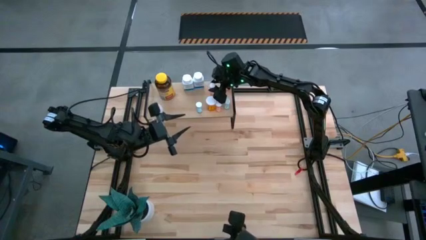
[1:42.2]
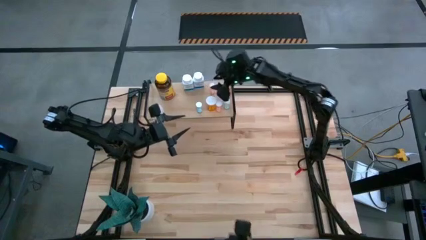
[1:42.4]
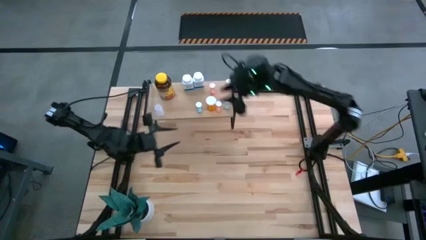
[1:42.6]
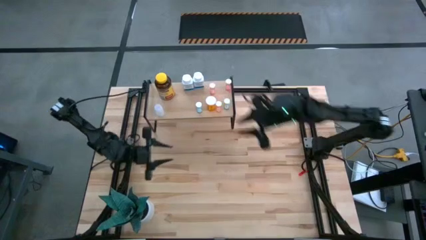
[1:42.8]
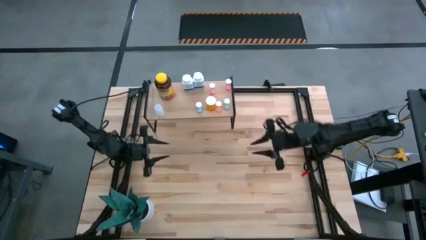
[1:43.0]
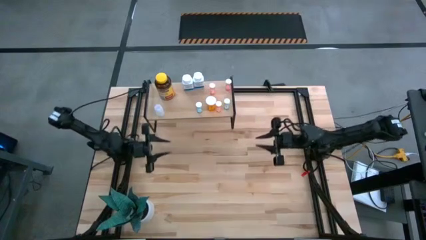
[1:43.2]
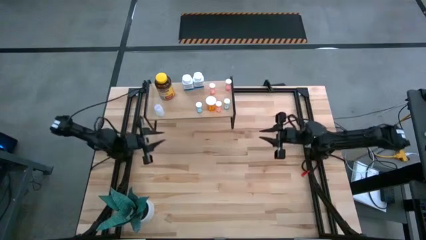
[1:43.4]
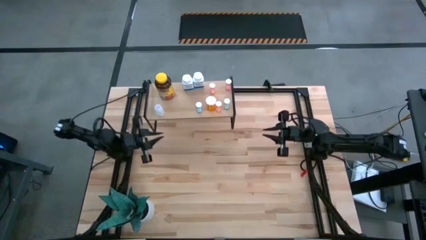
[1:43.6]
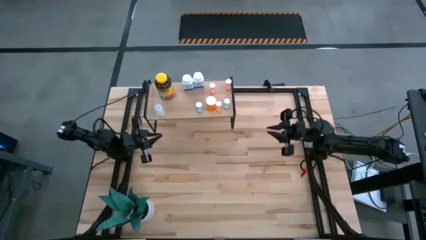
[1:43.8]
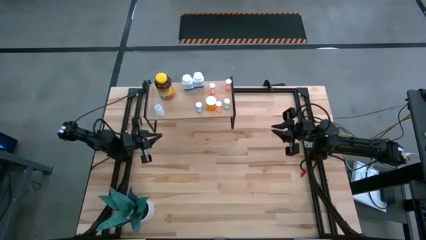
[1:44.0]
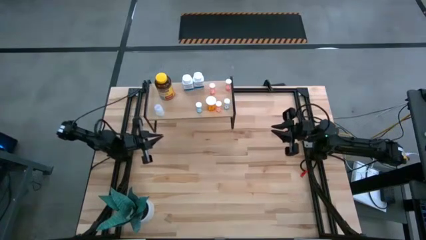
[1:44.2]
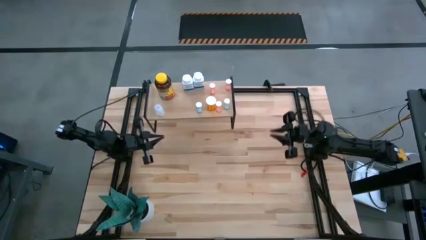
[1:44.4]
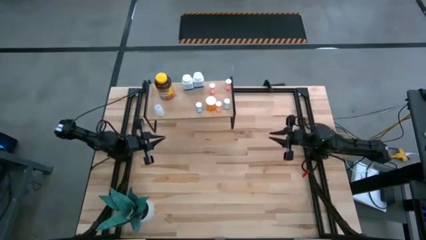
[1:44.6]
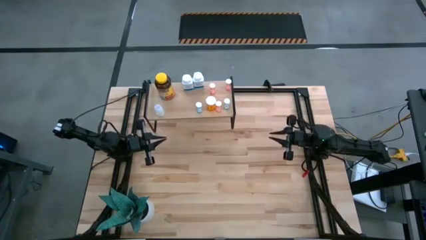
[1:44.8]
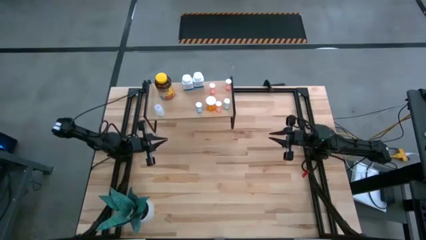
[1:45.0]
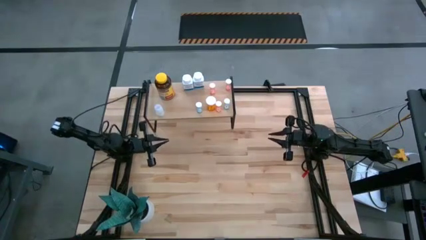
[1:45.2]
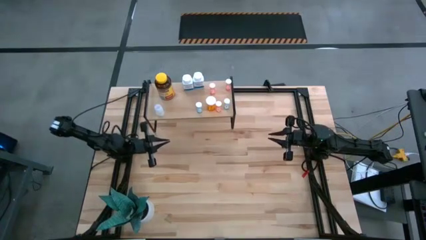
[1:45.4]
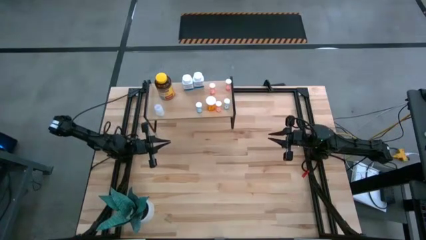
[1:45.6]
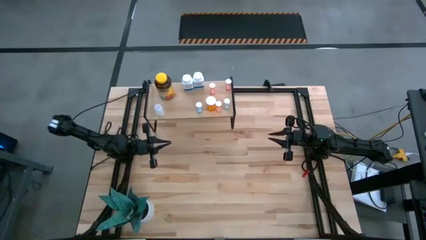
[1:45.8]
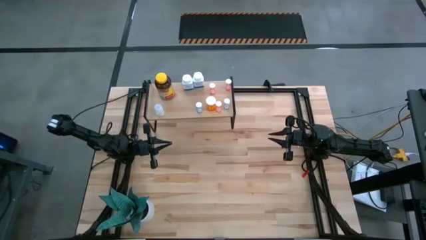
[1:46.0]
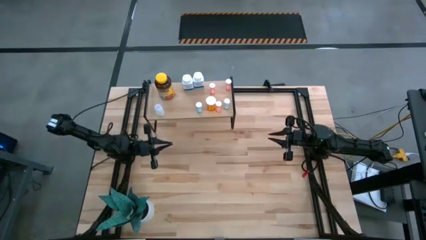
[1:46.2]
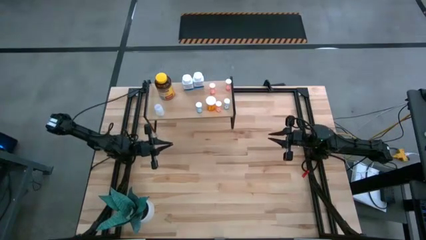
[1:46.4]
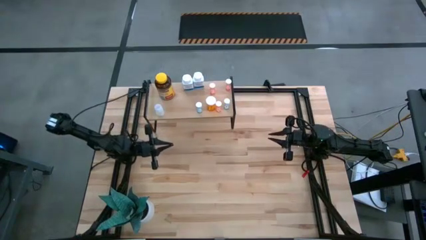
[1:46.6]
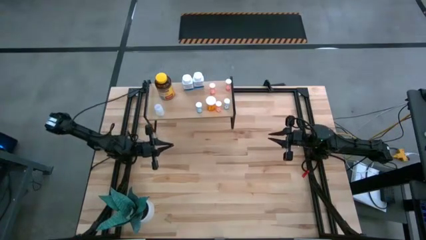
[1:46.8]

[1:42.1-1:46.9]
Task: Pick and place medicine bottles onto shelf by color
Return to Home Position

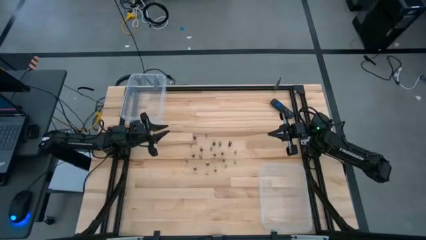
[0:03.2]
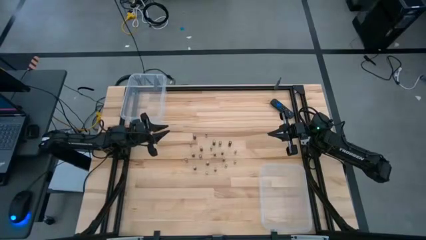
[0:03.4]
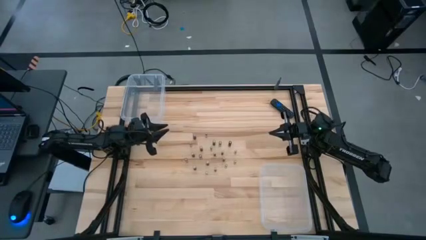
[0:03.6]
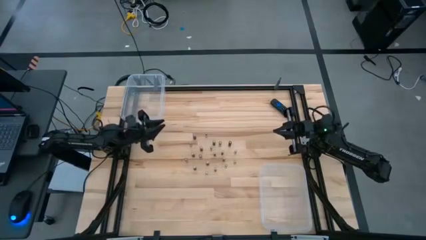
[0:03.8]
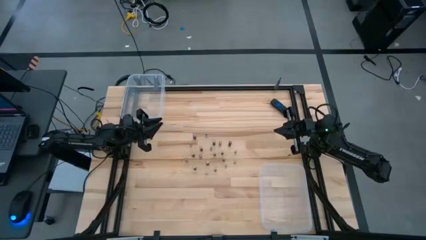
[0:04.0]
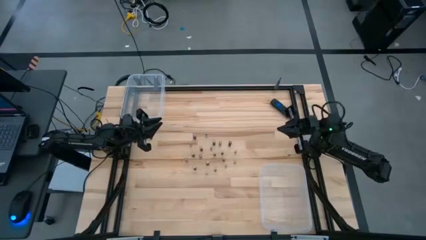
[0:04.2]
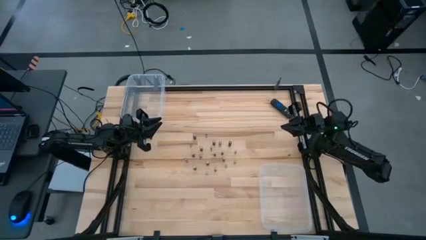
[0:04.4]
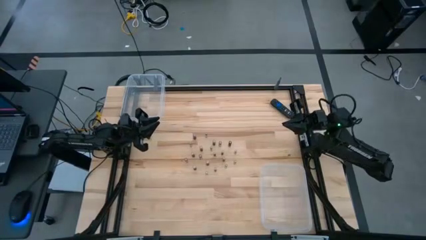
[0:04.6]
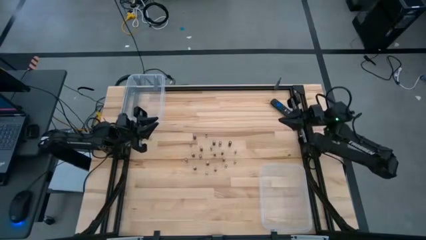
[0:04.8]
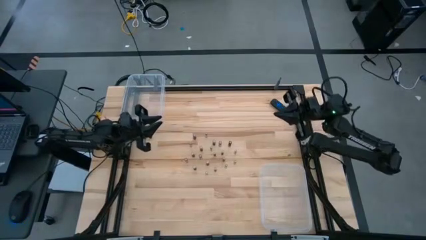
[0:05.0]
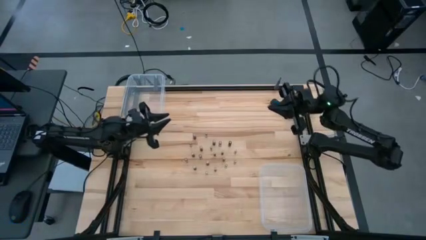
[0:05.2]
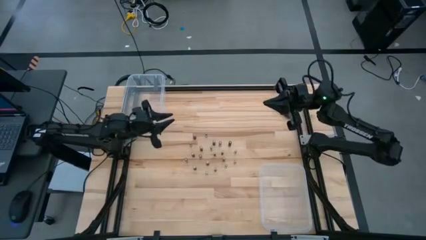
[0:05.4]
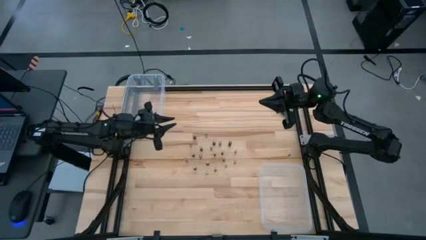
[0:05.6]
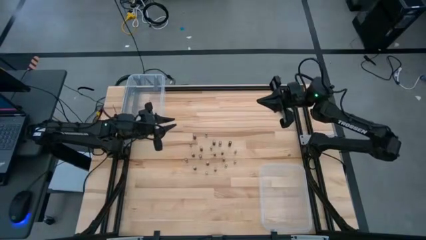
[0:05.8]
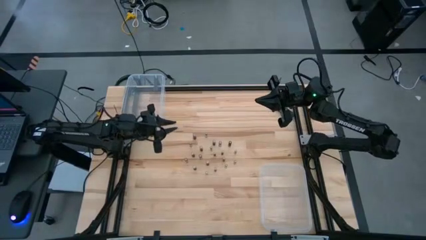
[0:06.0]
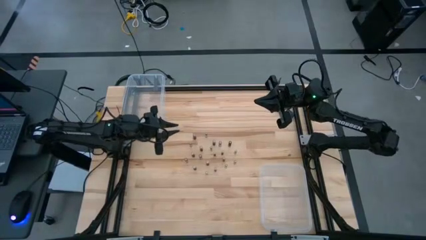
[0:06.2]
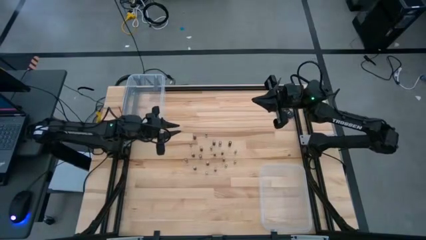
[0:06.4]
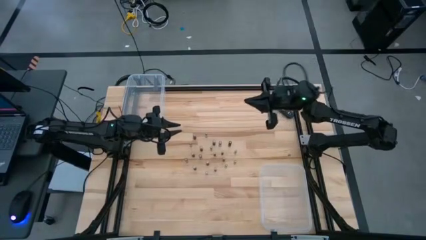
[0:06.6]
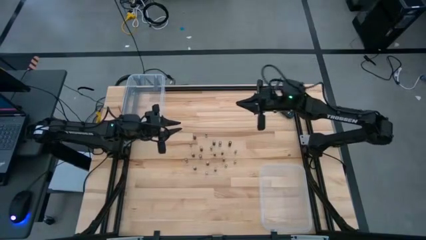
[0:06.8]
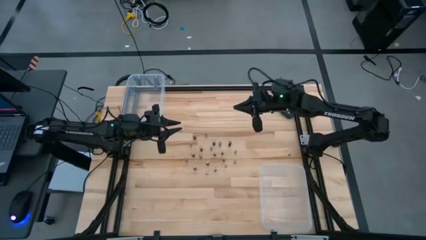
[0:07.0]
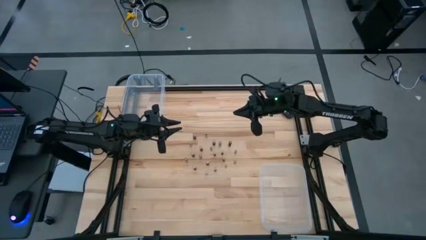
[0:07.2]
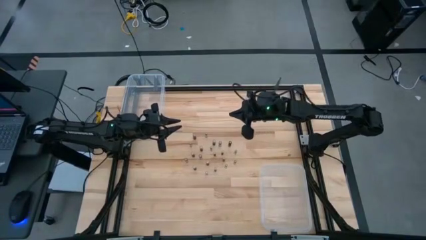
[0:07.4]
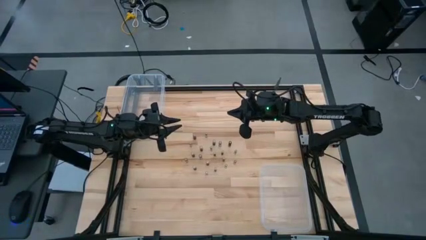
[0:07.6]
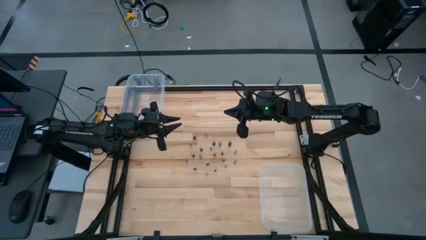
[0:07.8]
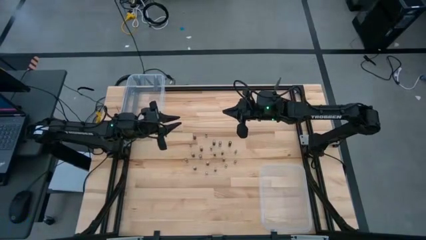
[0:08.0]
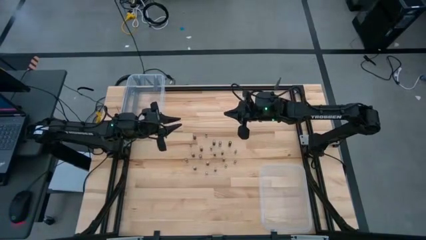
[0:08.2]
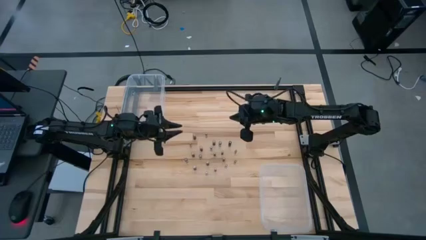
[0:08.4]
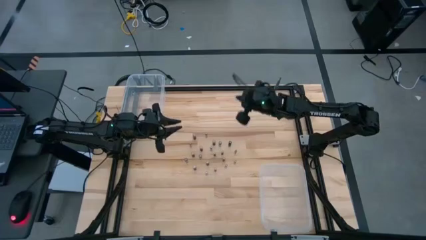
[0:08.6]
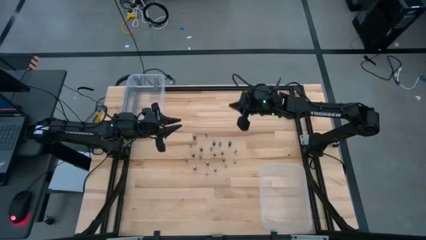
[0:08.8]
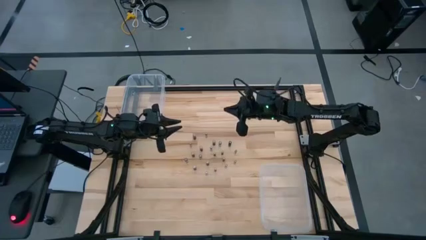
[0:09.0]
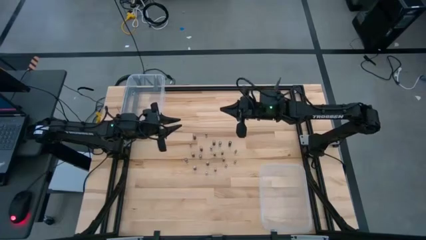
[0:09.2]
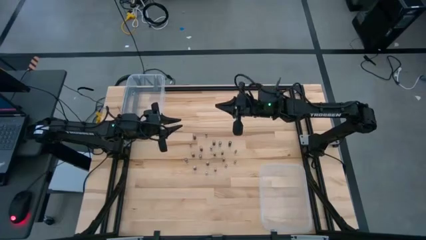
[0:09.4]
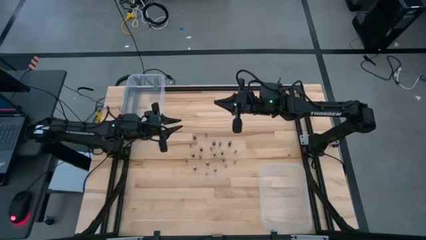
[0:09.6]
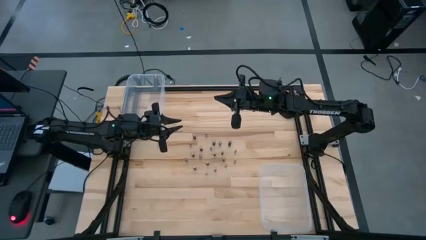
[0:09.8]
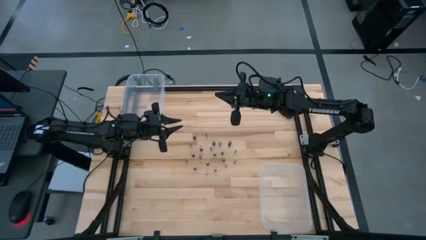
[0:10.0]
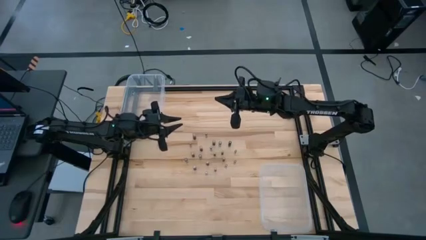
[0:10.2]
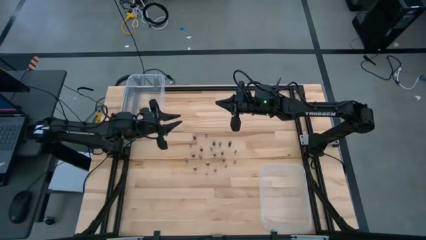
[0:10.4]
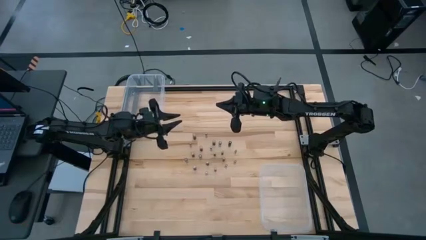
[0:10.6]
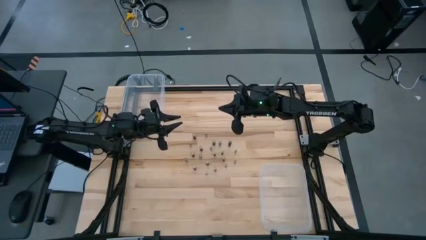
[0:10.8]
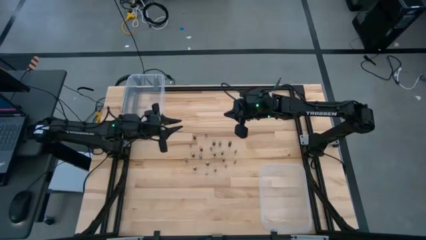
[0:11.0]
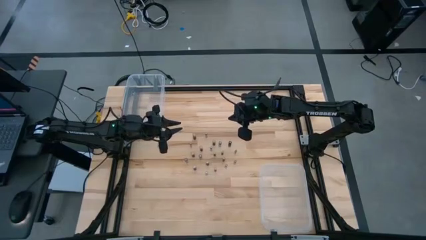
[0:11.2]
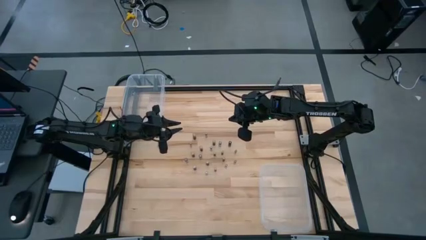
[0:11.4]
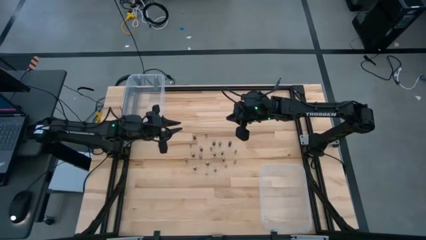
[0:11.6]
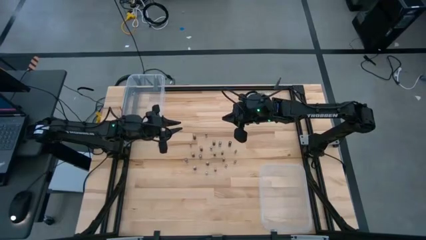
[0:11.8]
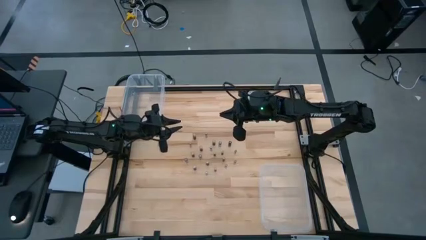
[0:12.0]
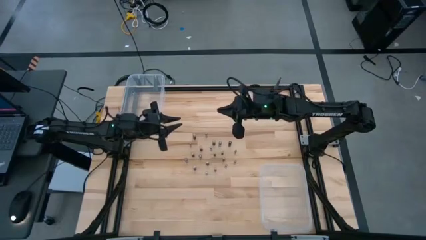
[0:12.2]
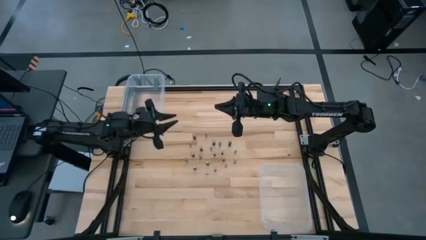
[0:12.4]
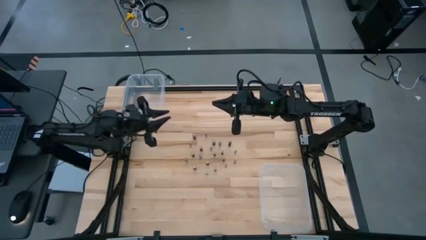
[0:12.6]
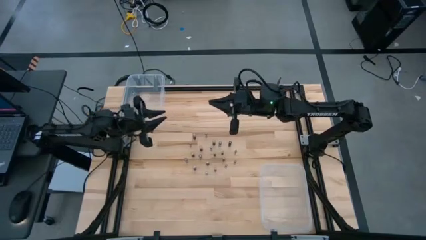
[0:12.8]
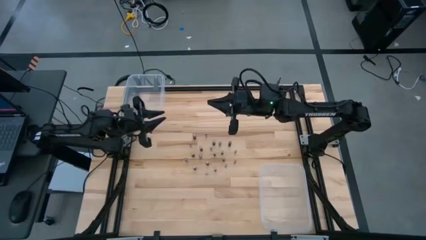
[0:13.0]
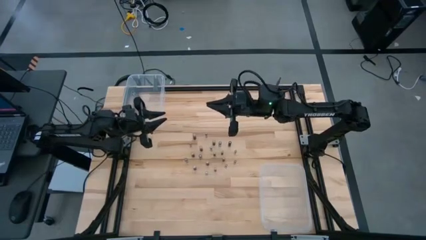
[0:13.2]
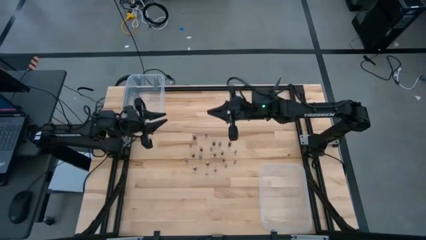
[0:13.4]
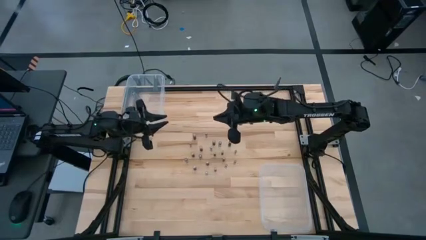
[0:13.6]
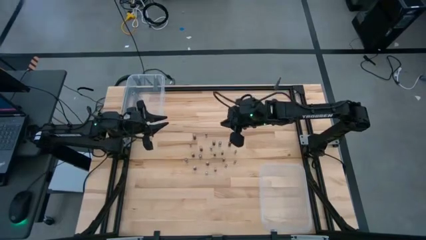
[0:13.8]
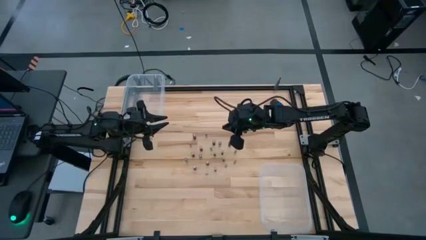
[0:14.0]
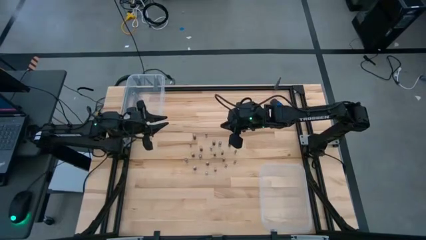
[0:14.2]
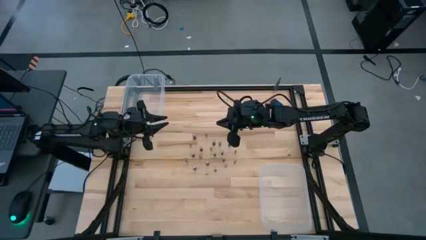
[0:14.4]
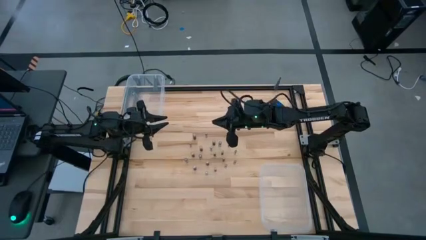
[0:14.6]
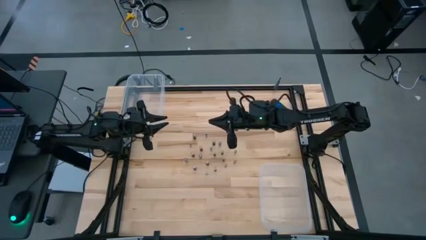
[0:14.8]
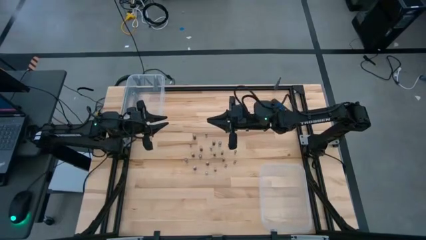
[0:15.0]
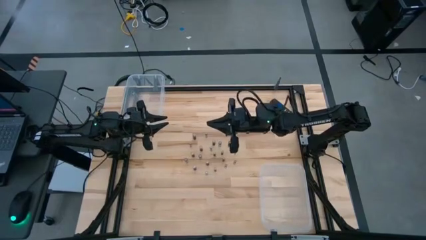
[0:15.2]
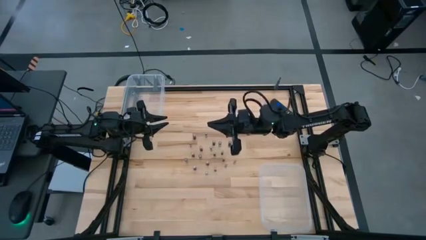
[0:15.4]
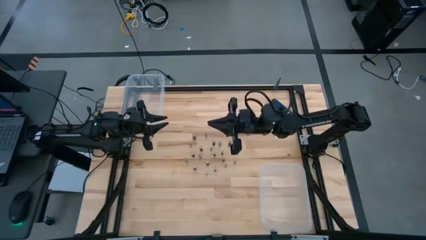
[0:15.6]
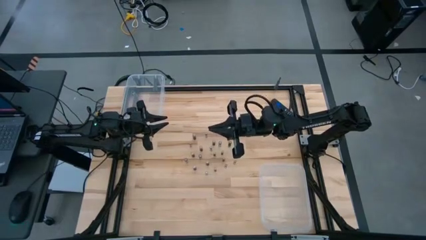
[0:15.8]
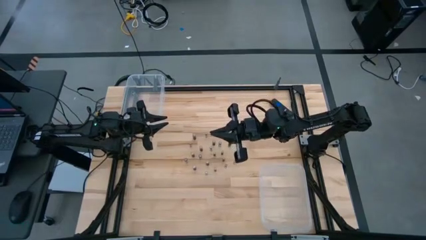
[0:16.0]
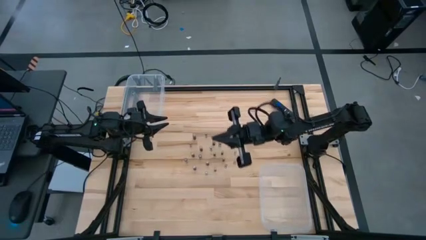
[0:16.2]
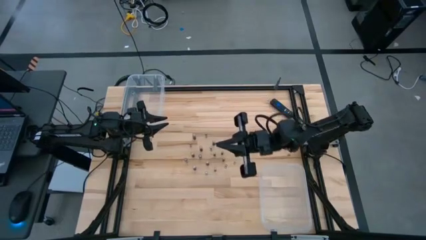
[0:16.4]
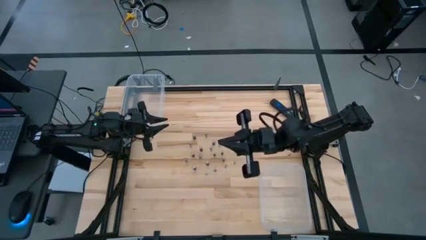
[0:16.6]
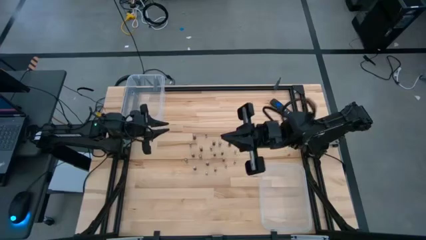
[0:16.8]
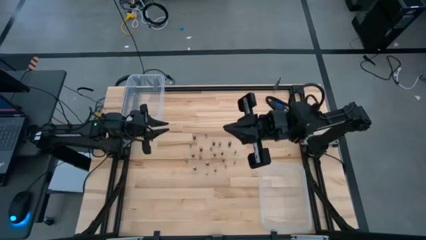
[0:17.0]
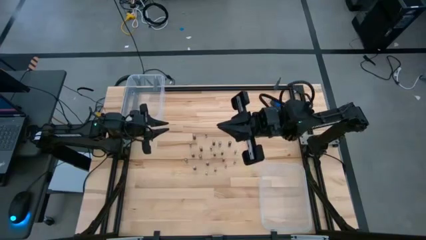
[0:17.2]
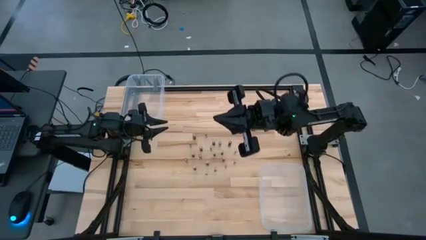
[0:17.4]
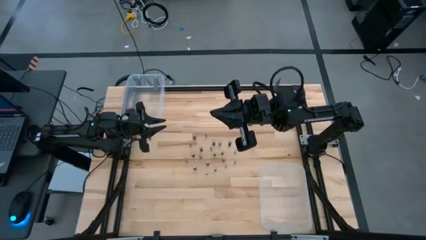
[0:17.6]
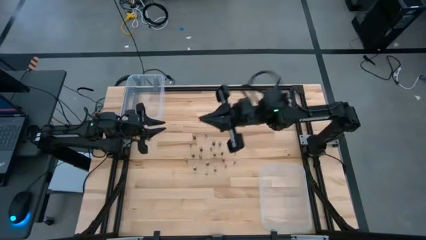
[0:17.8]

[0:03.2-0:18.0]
Task: Sort batteries
Put the black and copper battery into the top transparent bin
